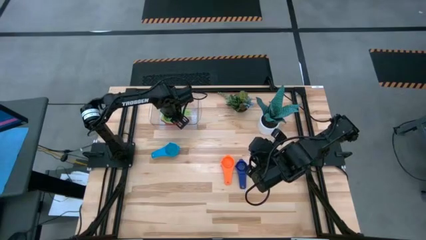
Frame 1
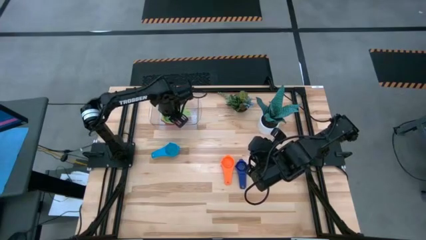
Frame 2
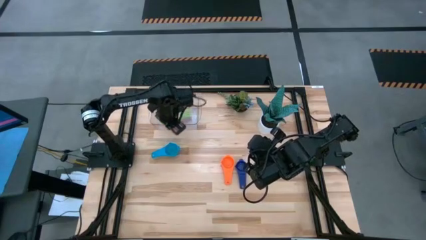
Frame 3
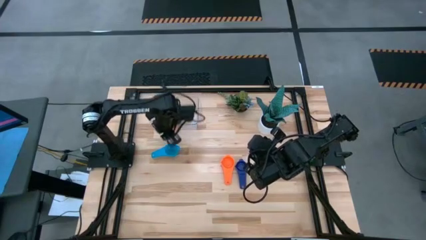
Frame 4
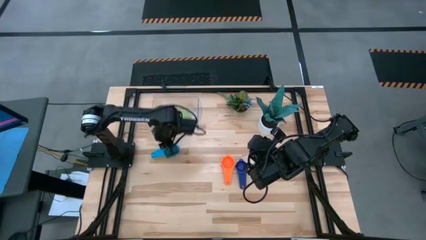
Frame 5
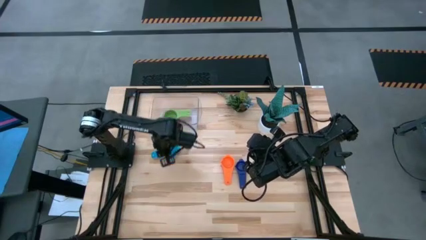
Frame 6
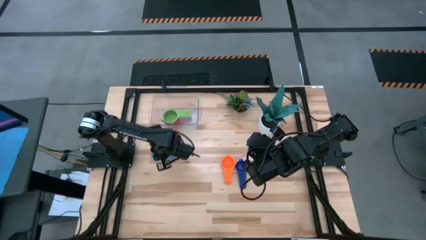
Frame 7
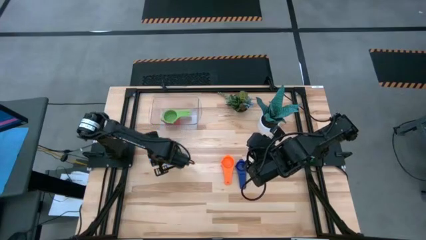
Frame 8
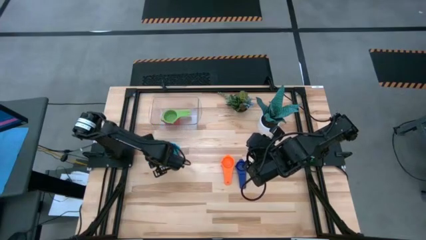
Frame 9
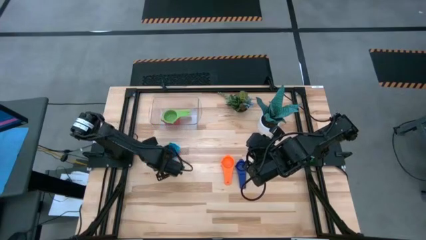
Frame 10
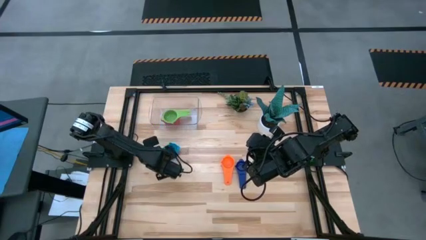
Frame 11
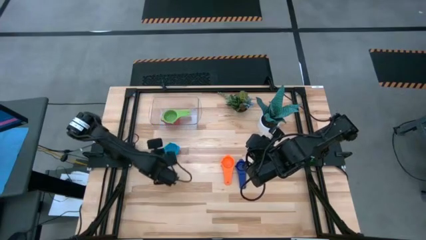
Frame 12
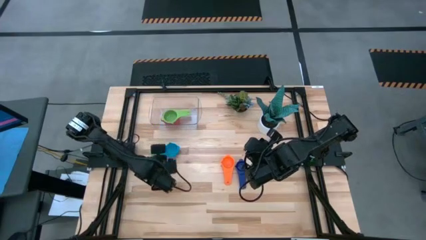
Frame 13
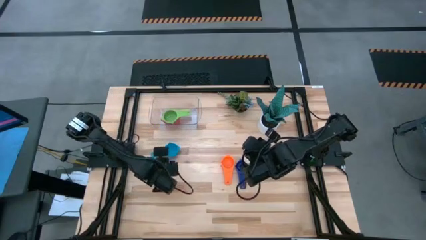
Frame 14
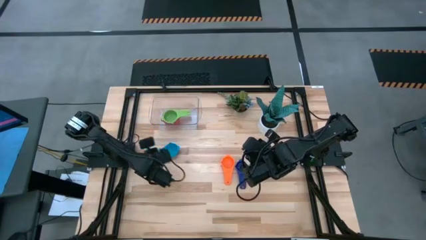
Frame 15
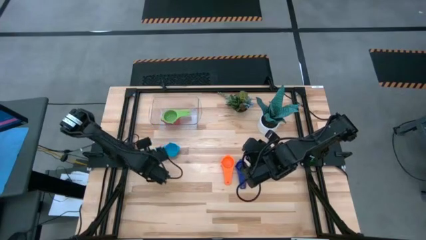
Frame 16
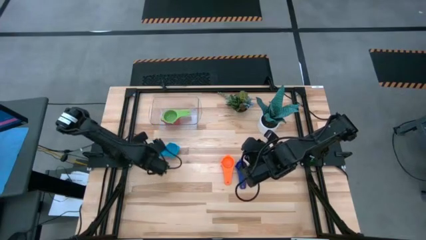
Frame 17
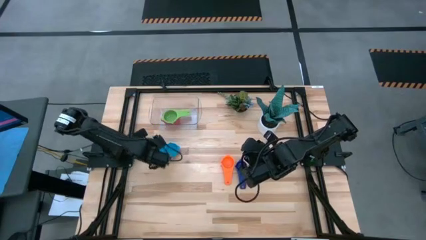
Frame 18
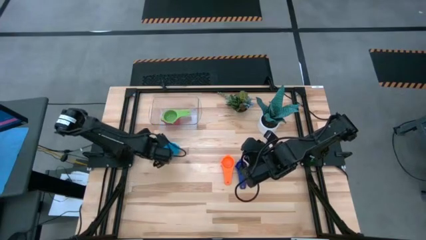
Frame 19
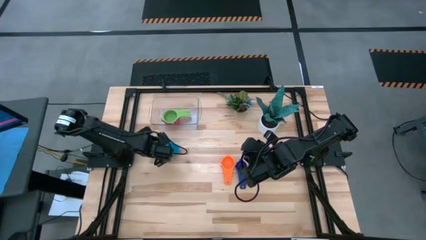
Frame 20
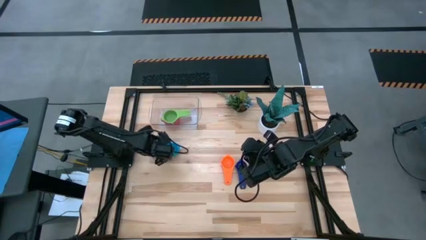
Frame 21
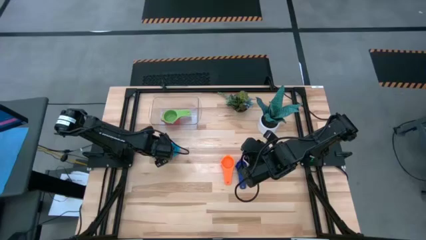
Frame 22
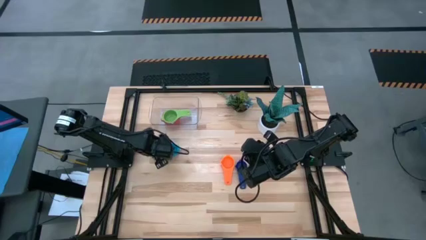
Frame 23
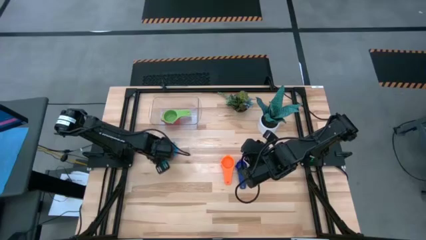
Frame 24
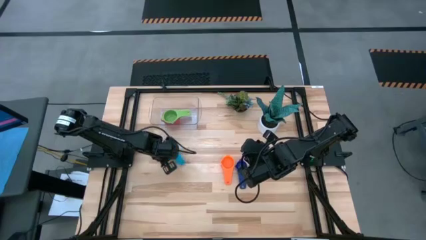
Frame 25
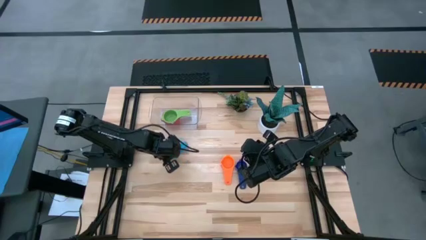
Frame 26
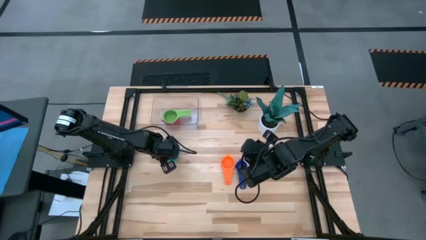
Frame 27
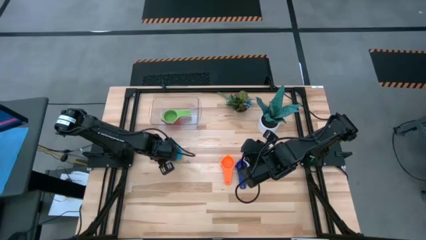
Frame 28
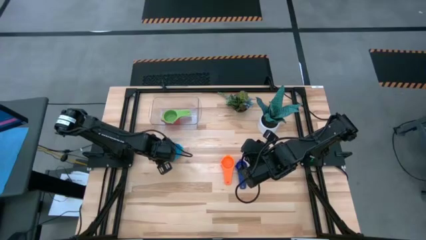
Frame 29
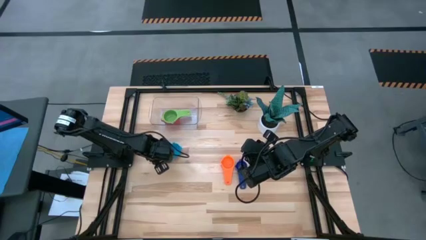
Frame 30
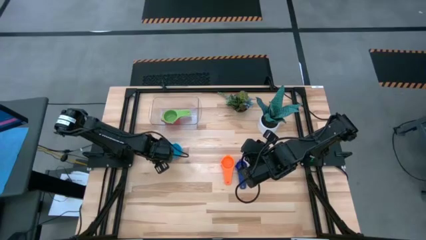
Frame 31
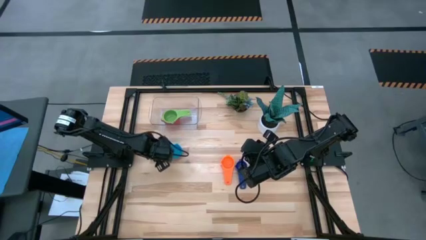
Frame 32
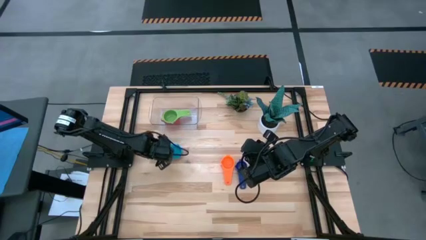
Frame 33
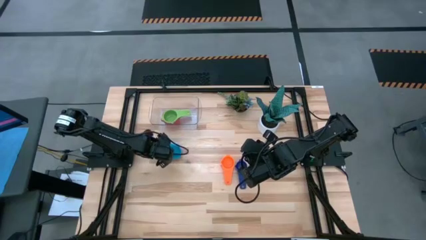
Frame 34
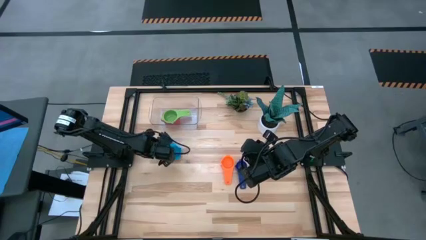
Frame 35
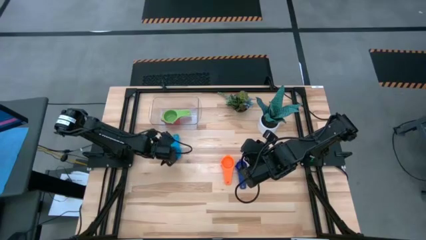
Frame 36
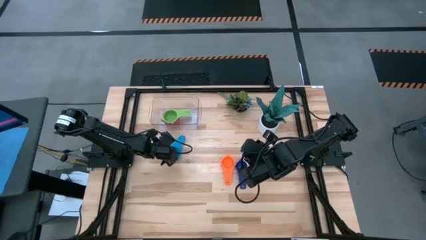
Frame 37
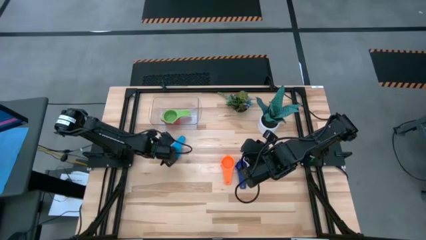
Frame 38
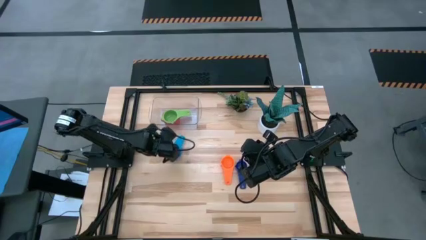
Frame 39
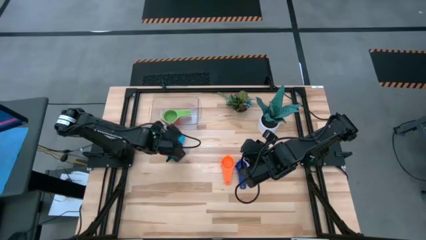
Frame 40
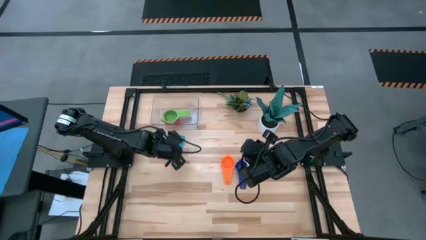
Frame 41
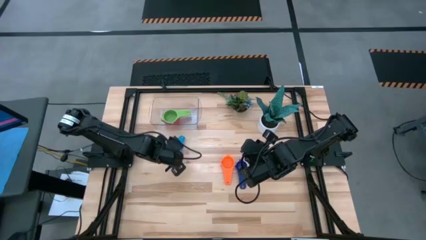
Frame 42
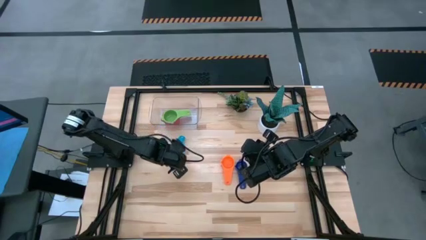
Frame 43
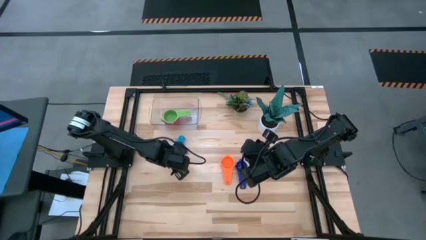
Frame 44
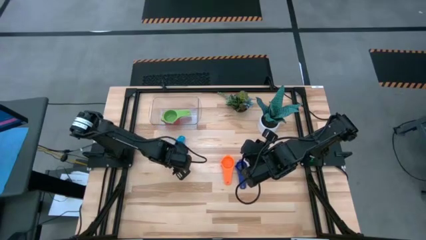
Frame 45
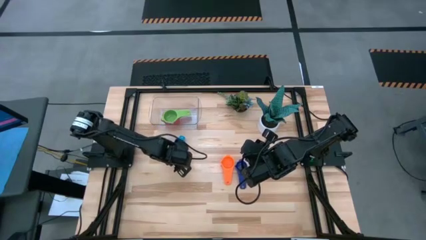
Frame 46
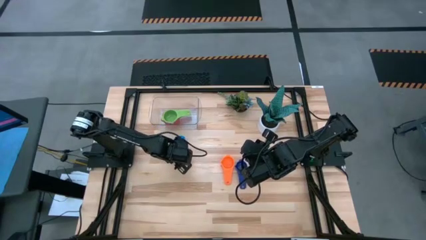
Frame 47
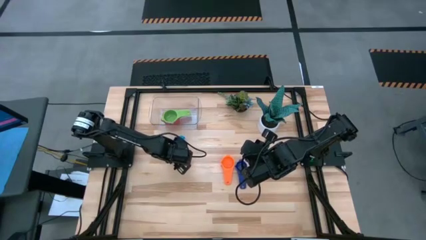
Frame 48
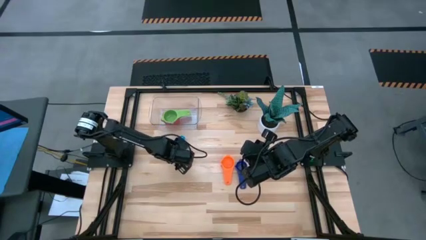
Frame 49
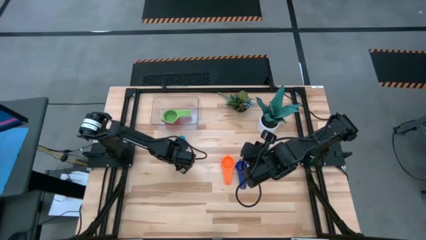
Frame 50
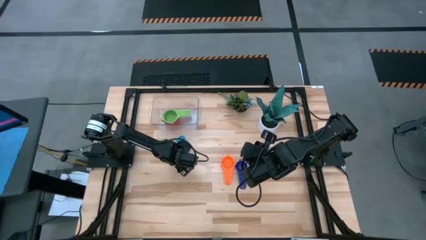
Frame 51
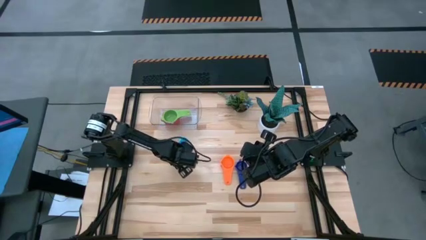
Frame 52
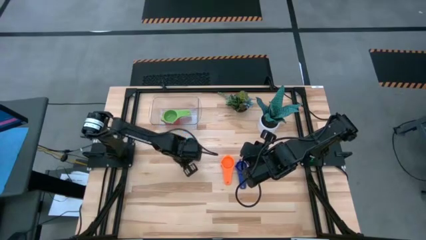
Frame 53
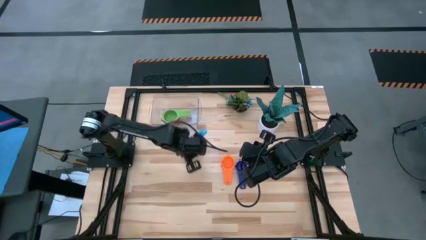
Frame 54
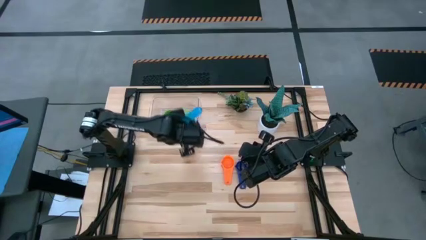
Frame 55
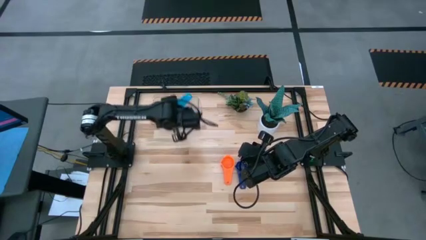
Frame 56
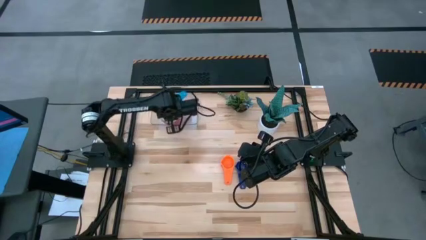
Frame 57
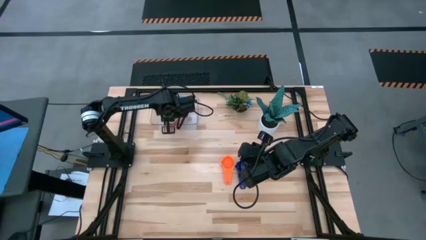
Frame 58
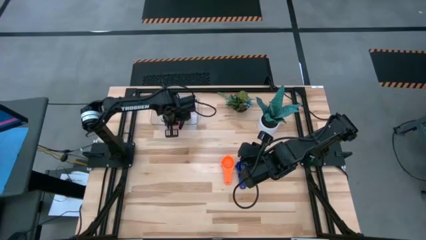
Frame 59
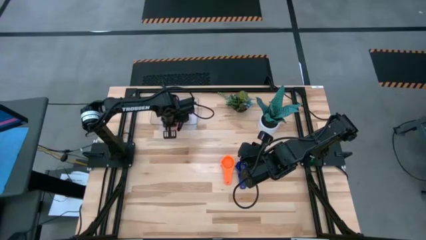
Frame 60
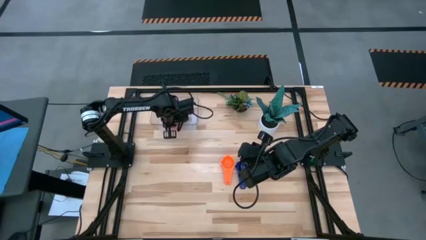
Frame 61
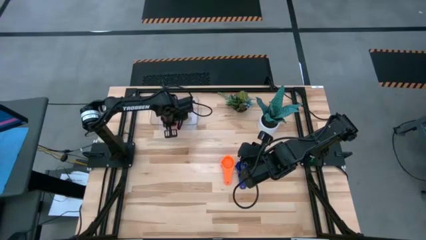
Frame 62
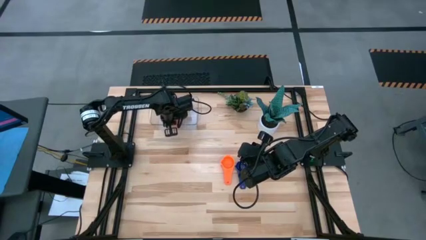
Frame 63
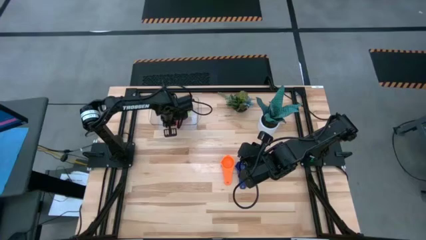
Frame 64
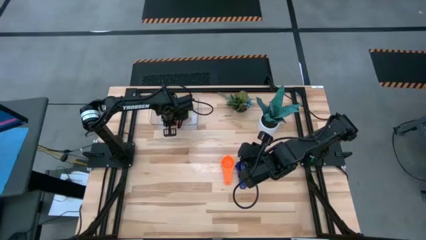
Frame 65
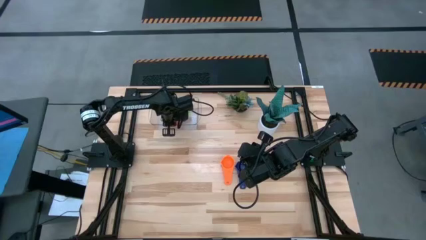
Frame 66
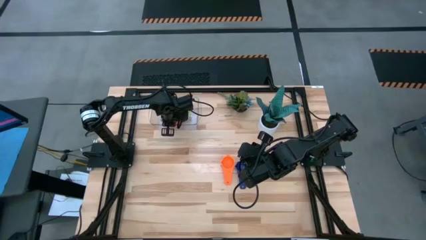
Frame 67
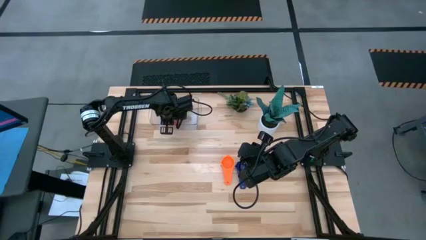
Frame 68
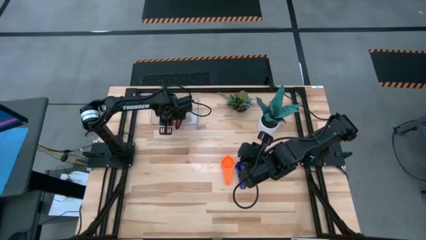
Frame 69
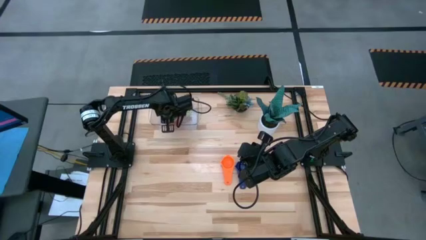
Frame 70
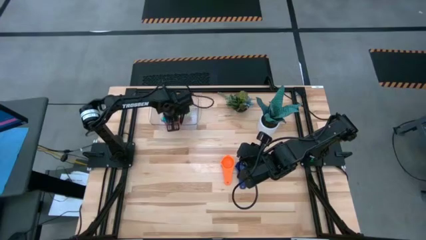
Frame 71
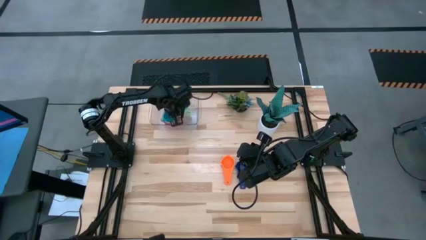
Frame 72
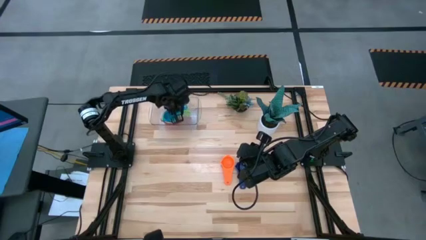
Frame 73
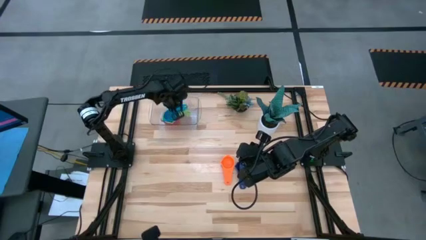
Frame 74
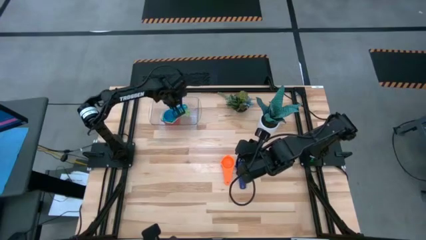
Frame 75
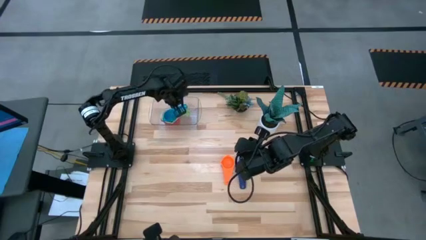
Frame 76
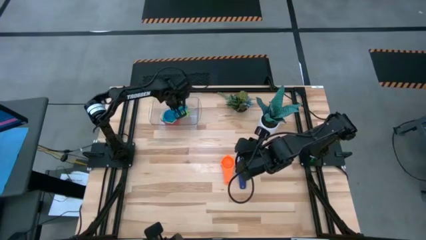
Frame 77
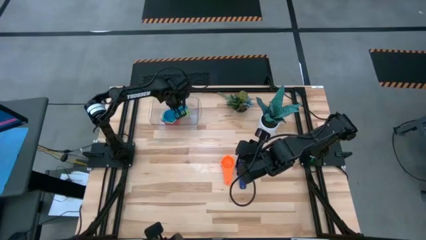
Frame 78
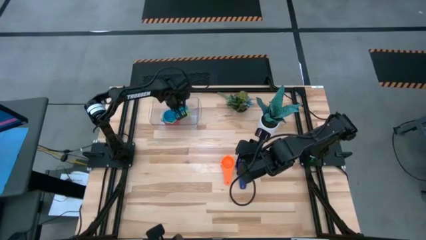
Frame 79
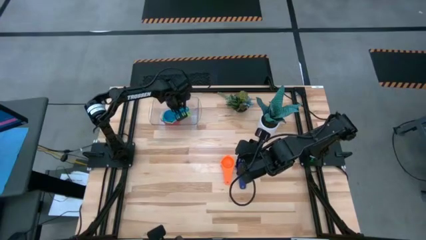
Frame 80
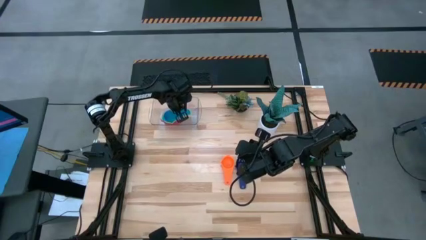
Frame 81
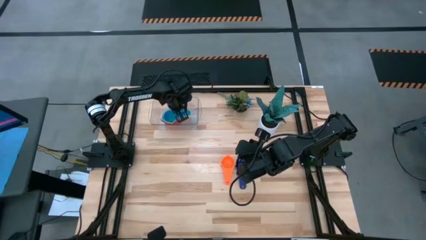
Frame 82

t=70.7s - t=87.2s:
Task: Nest measuring cups in basket
Stack the light blue measuring cup on top of the green measuring cup in the transparent bin
